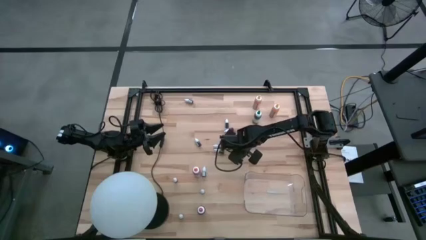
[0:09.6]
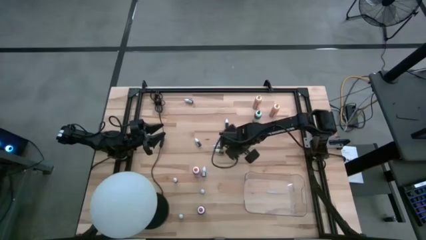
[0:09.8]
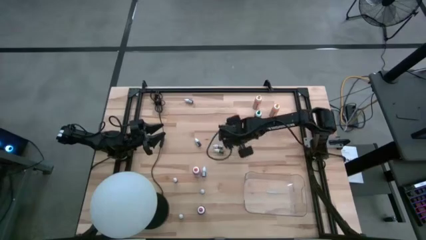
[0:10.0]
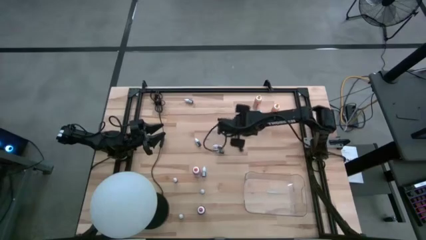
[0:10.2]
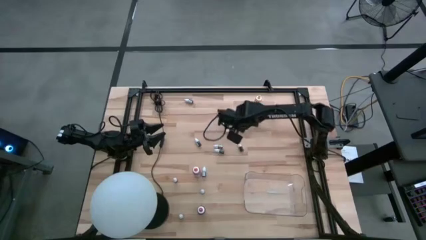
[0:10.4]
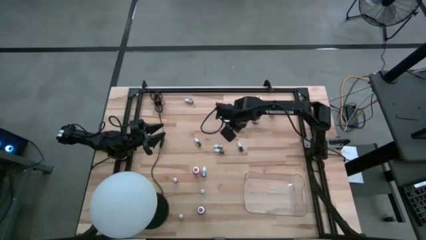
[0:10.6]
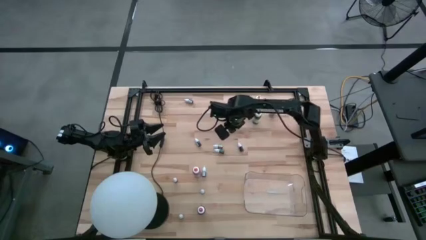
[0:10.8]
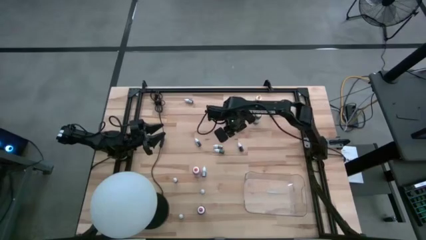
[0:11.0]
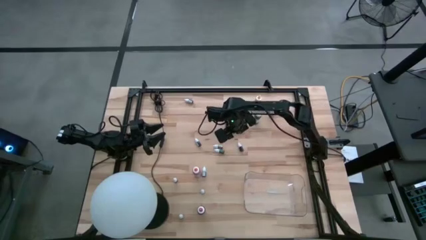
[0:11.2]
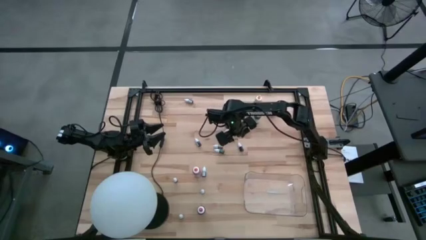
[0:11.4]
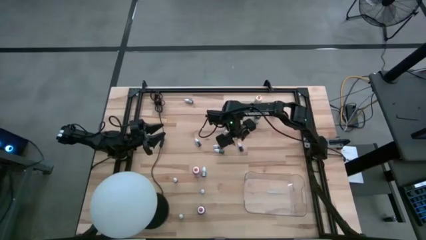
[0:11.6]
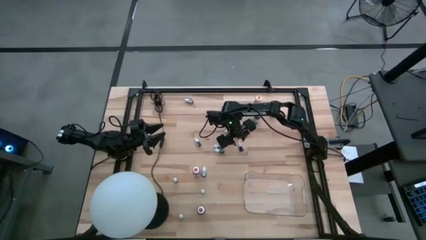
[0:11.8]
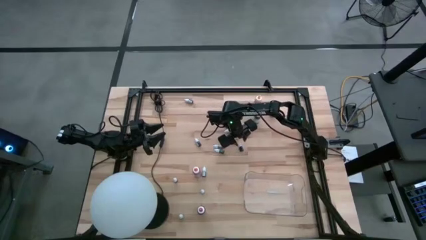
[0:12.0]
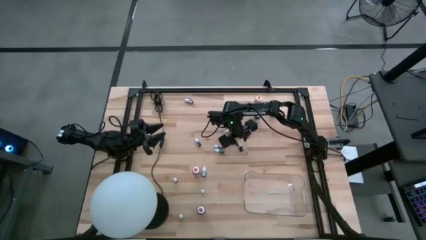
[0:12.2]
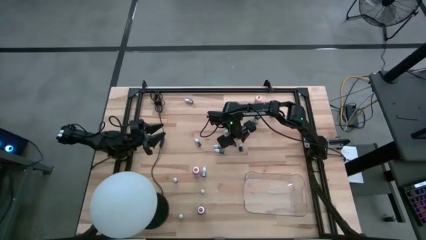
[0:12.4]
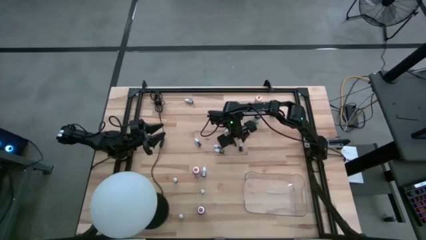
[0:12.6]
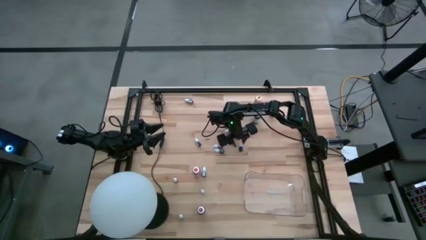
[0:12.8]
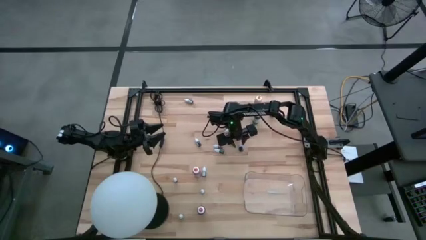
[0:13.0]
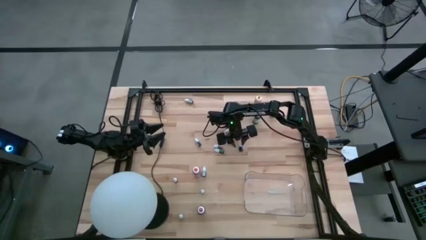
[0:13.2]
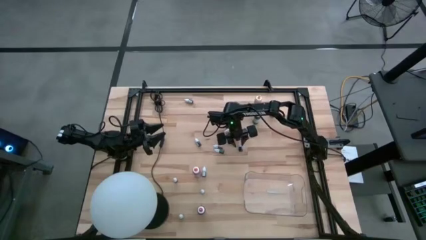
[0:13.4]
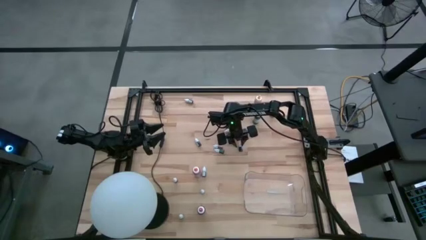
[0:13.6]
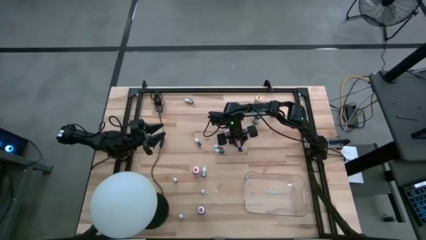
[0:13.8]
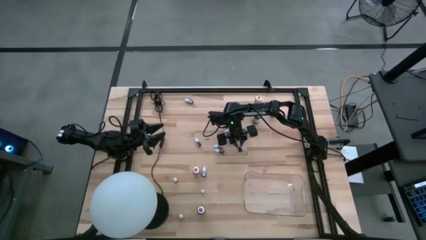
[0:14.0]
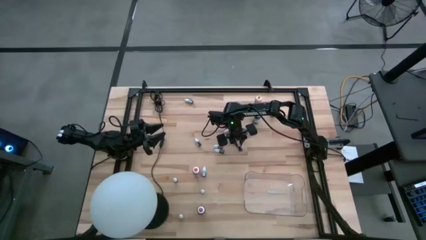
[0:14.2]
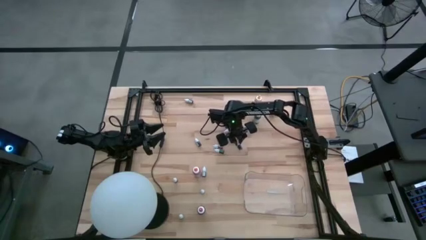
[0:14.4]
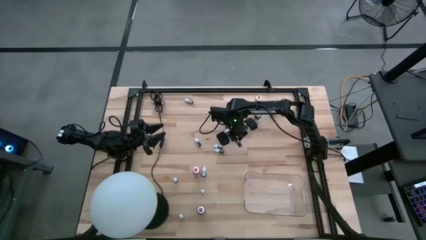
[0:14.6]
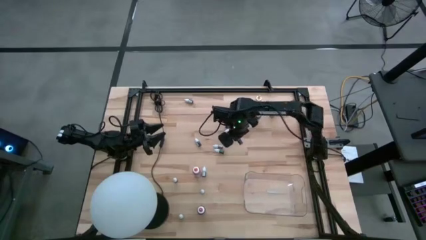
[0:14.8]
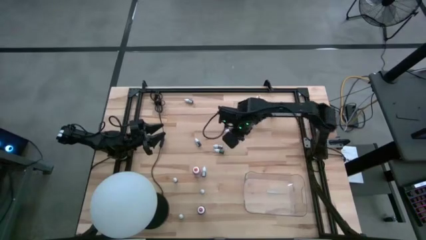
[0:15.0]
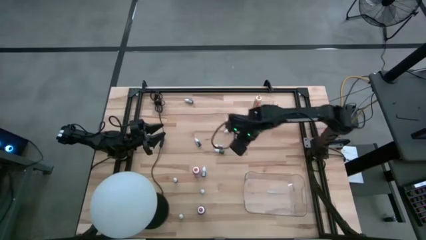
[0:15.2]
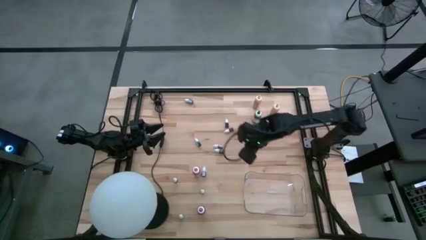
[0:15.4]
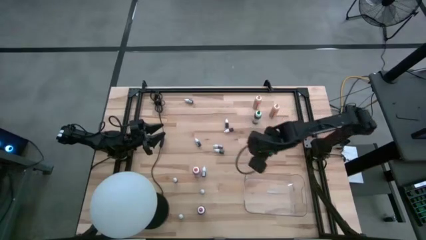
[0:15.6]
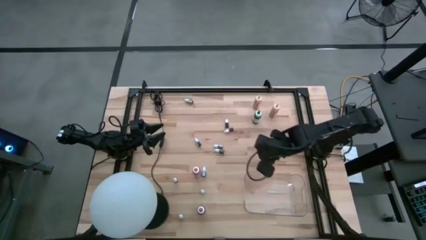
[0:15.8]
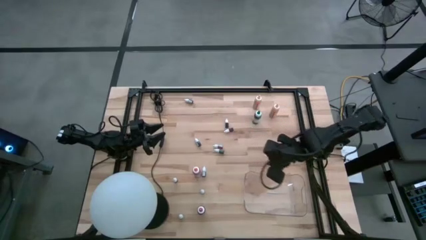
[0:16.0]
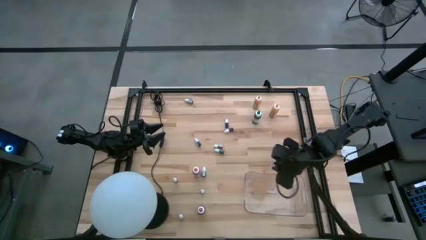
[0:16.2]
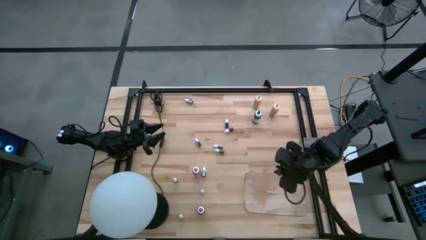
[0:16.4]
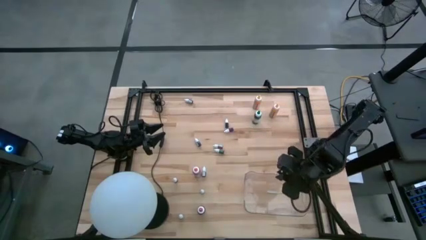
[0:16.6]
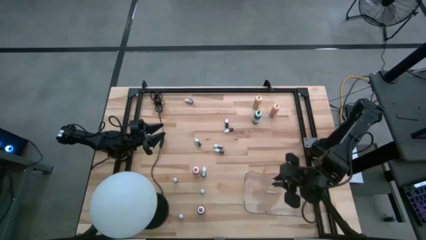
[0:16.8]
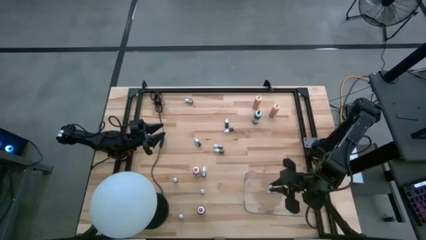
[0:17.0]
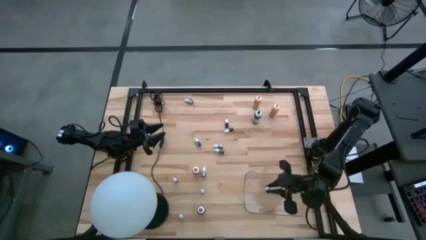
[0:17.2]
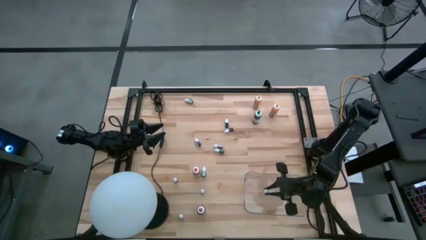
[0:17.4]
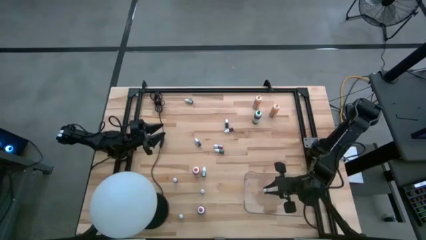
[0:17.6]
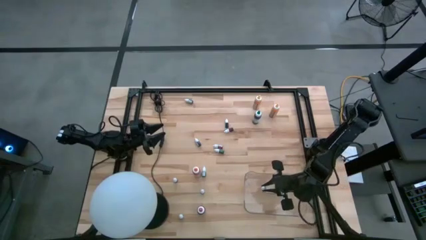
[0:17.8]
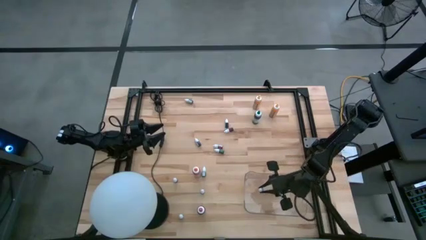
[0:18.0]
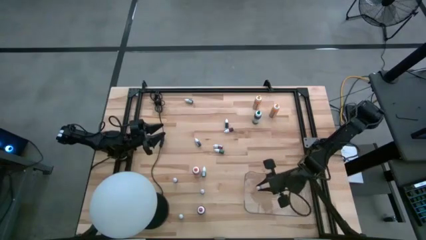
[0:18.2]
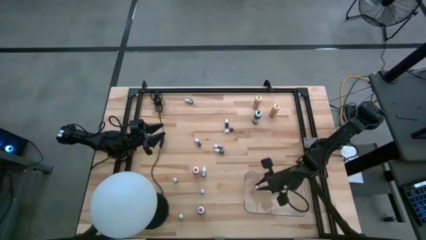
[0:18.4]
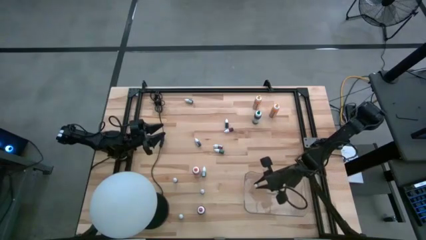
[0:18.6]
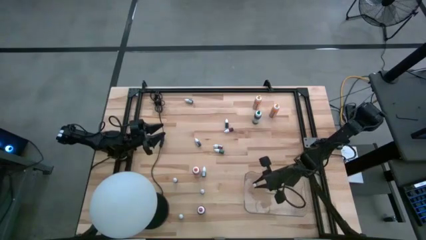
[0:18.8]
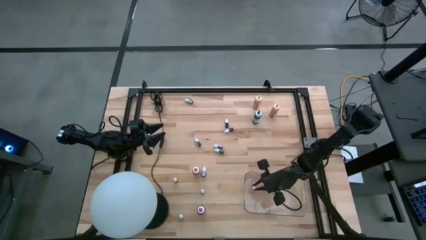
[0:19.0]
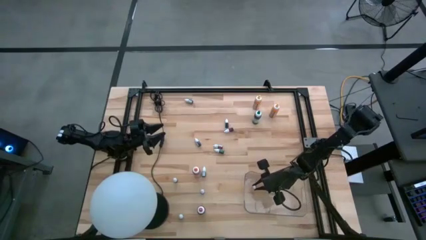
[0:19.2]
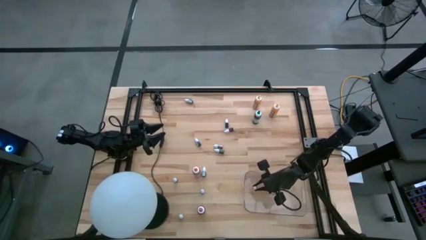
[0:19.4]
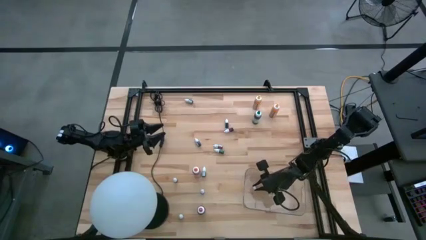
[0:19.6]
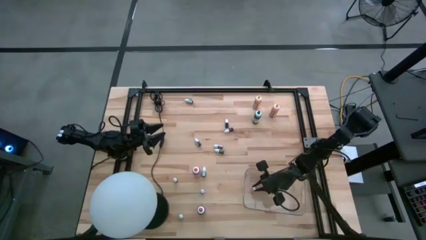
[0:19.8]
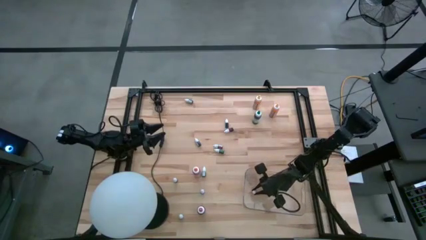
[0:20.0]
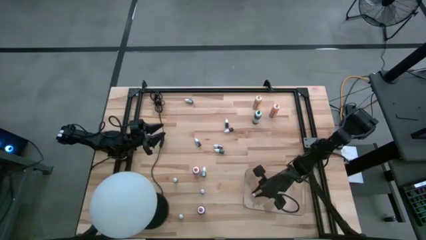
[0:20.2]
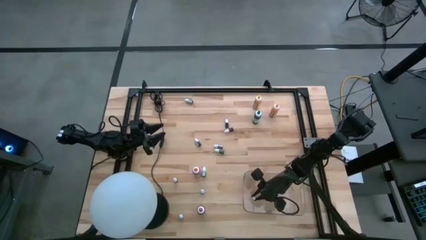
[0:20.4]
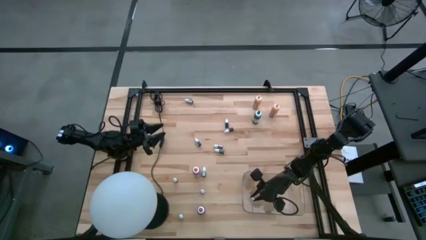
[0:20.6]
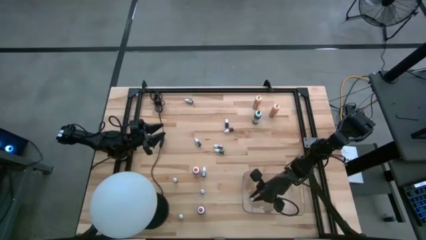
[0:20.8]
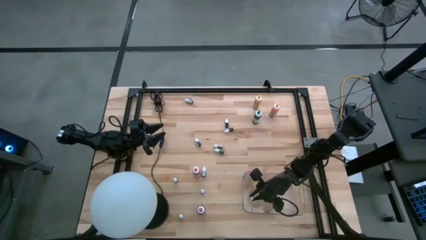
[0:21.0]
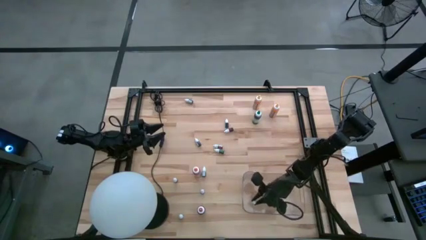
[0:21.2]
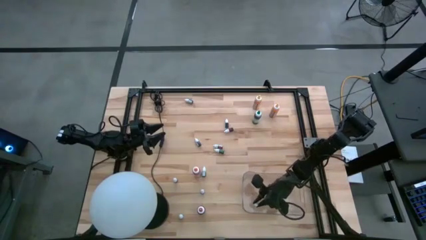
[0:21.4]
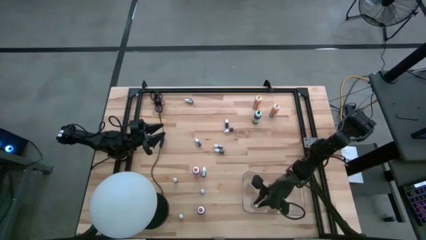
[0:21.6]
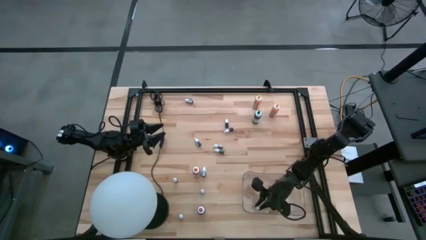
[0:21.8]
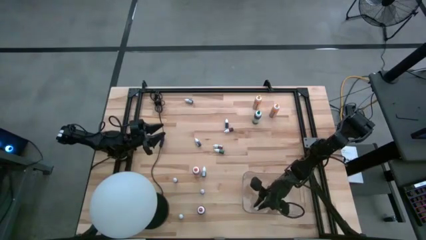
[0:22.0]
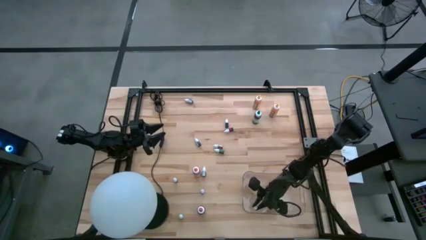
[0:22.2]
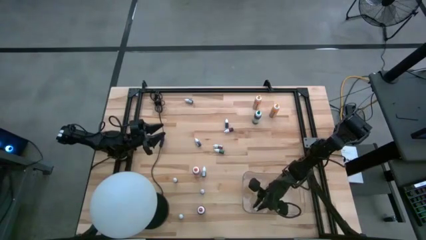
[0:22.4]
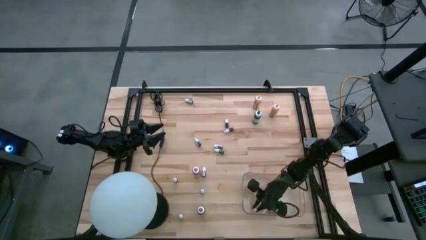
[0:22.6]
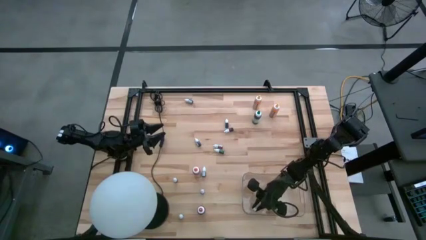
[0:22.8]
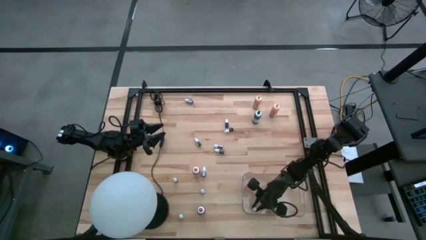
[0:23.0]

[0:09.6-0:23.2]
Task: Pick & Place food coloring
Put the violet food color into the transparent bin

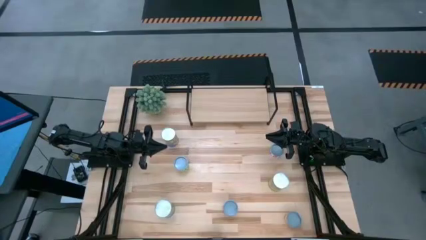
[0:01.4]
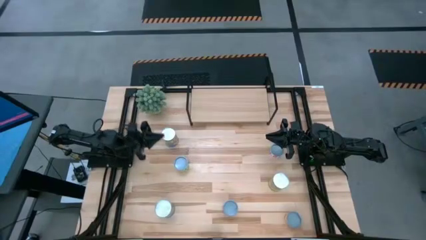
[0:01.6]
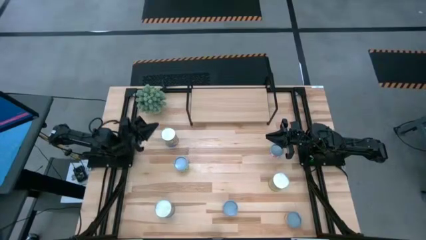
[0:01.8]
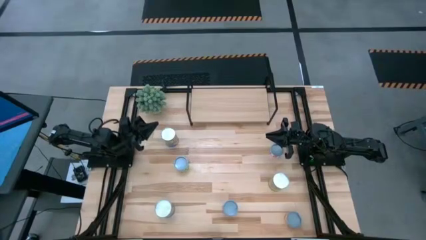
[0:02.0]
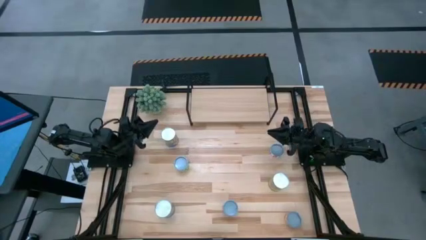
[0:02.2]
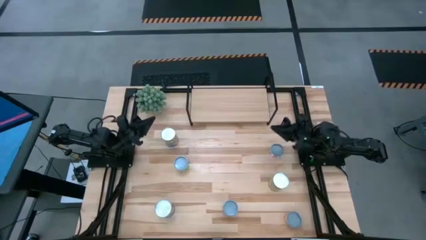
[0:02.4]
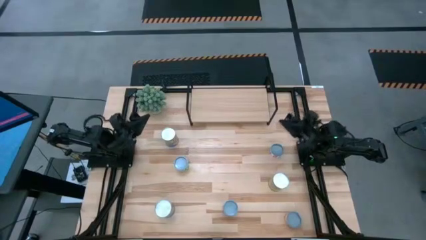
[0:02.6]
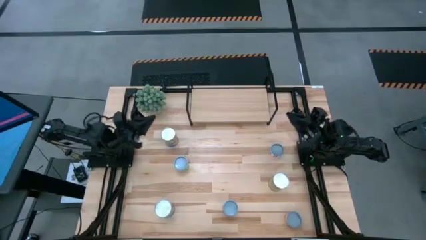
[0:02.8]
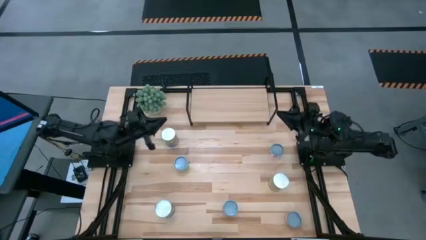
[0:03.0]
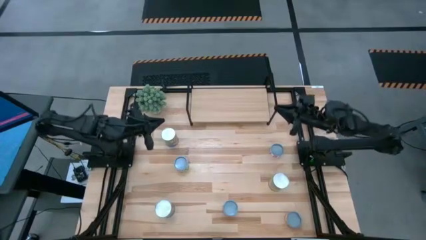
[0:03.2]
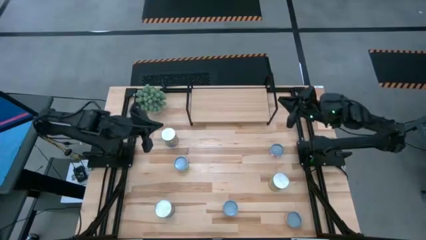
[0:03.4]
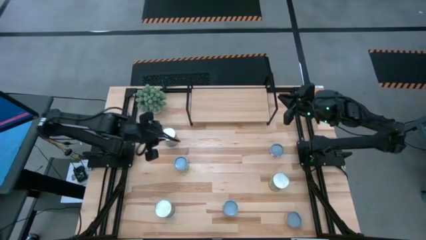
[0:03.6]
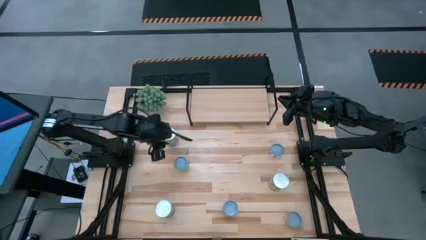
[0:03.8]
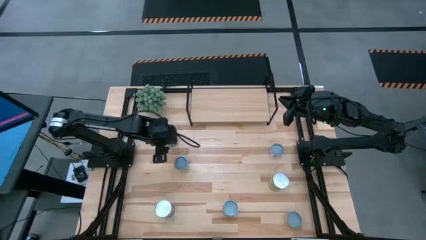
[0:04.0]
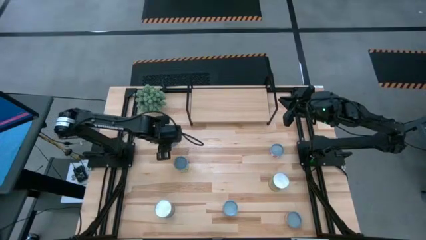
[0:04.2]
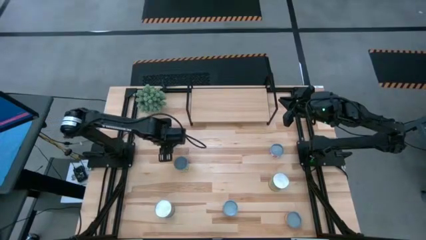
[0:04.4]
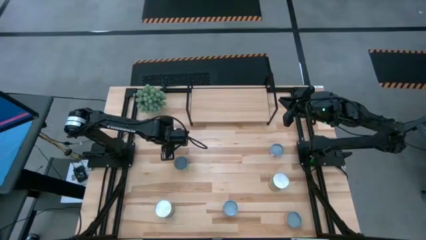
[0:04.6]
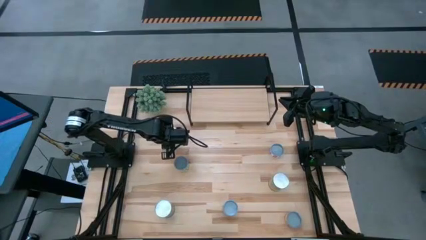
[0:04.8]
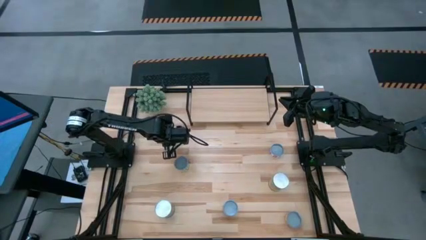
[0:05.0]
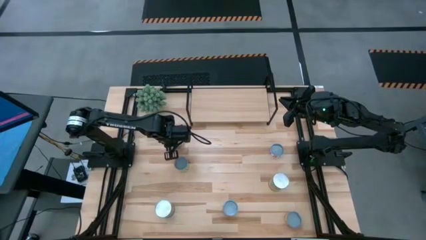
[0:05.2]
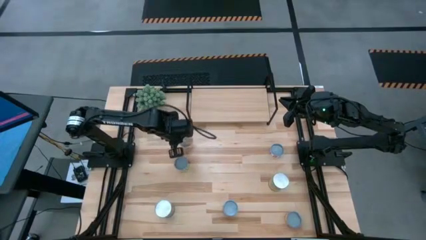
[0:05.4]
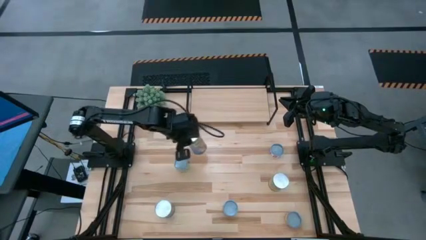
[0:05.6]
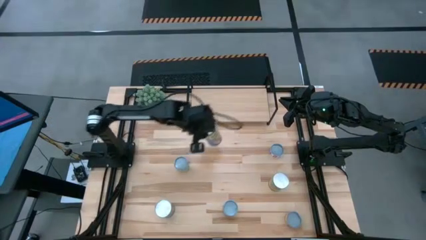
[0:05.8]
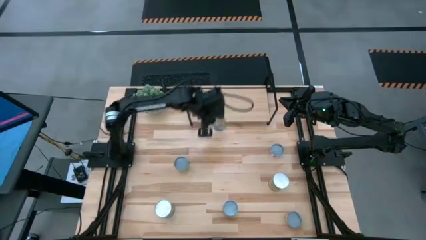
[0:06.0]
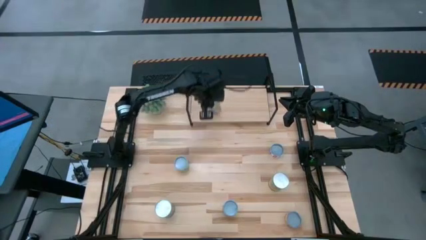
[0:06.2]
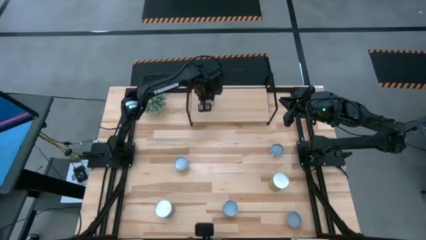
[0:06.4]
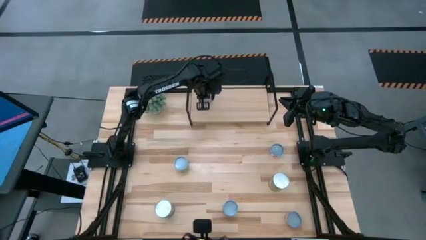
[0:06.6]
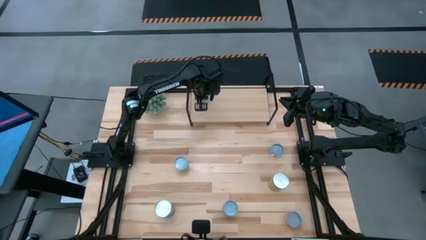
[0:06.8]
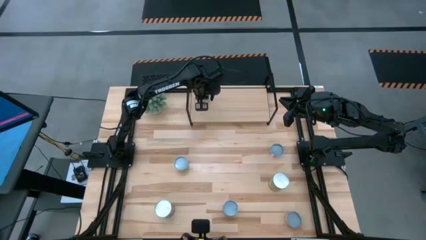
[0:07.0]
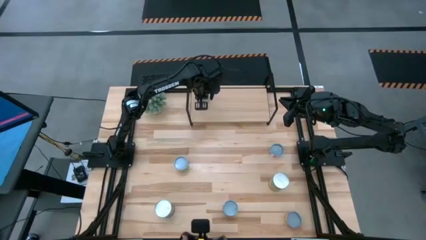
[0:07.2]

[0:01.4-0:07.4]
Task: Pick and place cans onto a shelf
Put the canned peaches on the shelf
